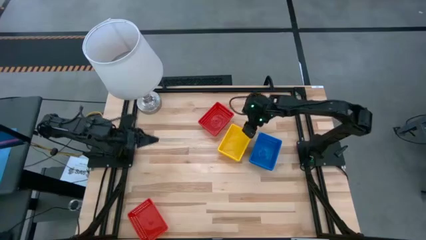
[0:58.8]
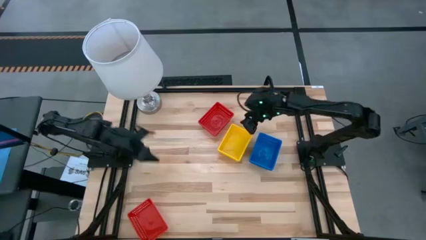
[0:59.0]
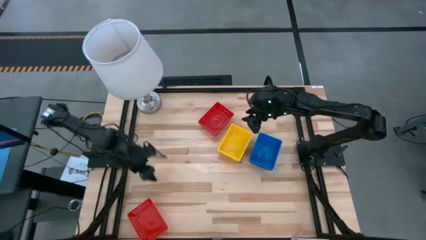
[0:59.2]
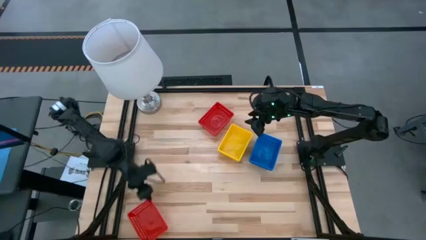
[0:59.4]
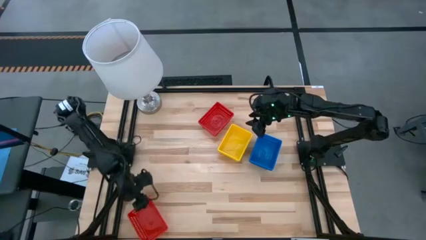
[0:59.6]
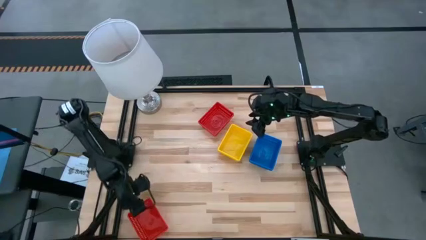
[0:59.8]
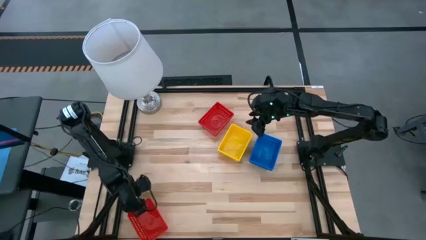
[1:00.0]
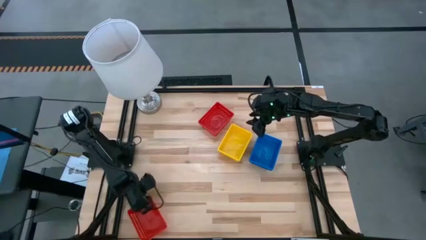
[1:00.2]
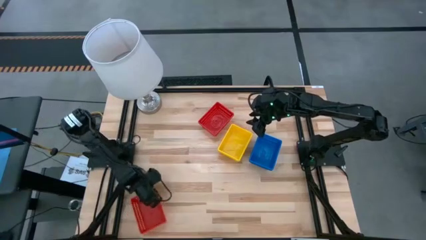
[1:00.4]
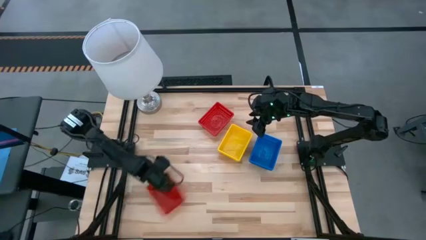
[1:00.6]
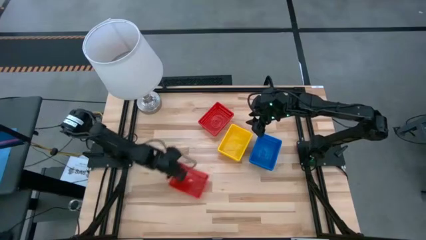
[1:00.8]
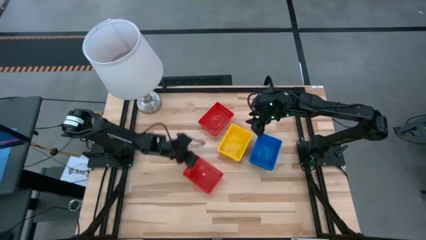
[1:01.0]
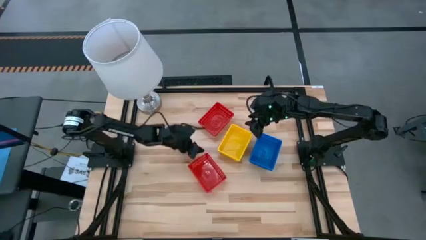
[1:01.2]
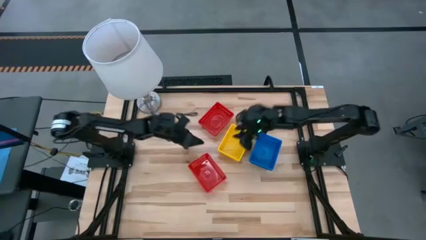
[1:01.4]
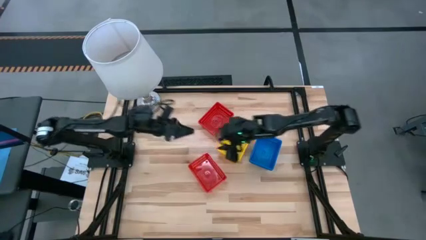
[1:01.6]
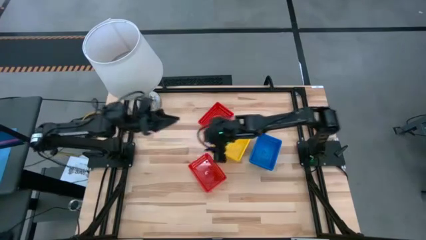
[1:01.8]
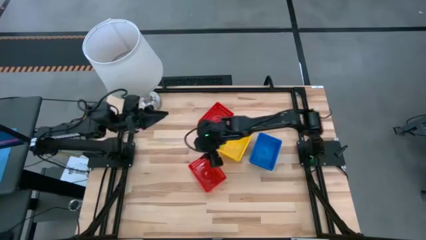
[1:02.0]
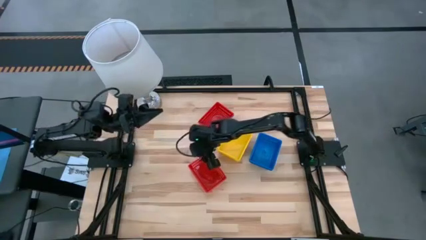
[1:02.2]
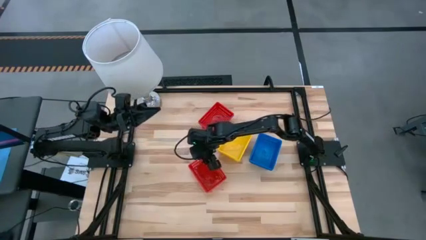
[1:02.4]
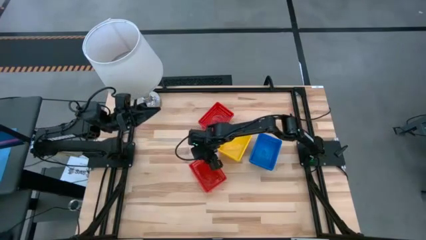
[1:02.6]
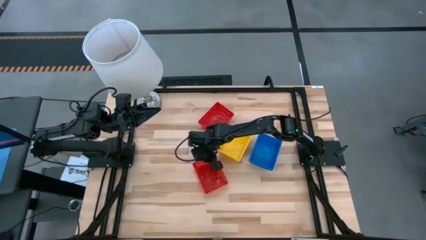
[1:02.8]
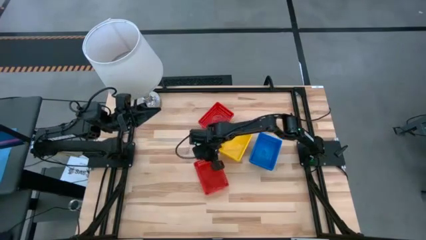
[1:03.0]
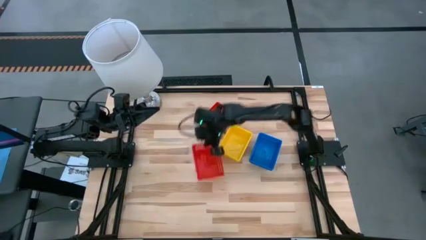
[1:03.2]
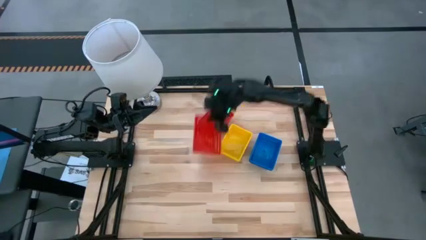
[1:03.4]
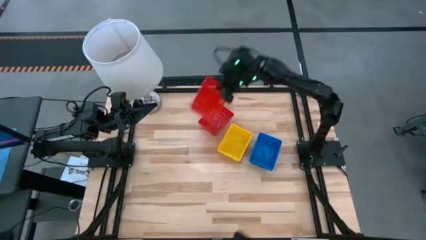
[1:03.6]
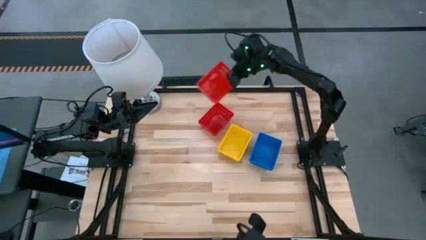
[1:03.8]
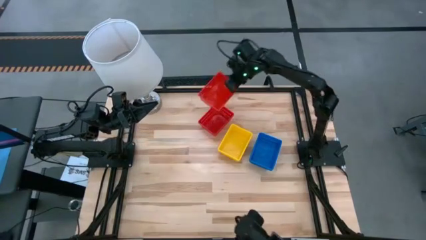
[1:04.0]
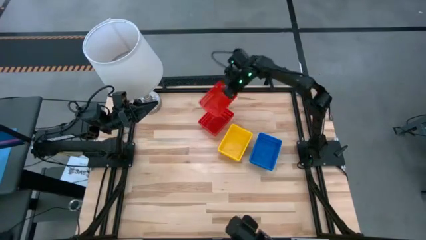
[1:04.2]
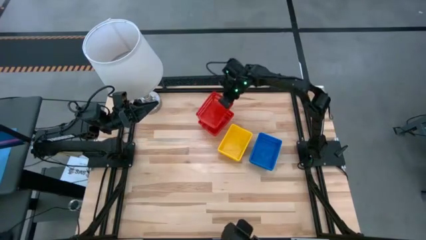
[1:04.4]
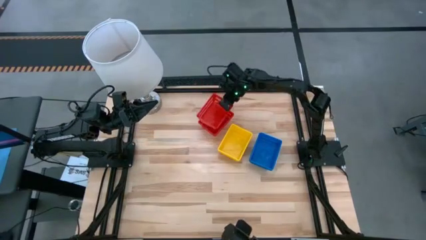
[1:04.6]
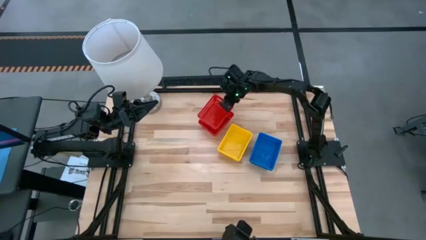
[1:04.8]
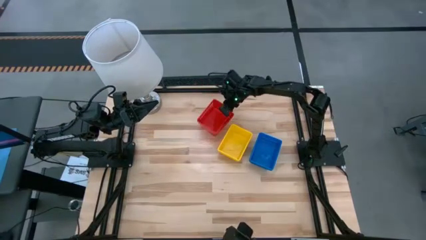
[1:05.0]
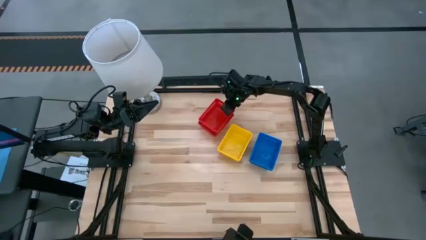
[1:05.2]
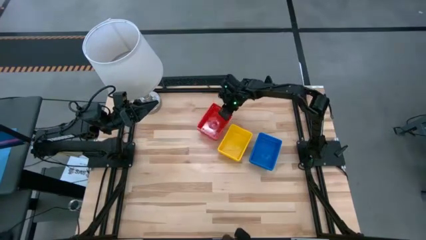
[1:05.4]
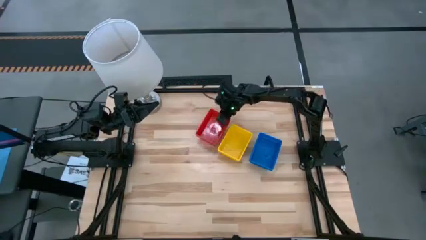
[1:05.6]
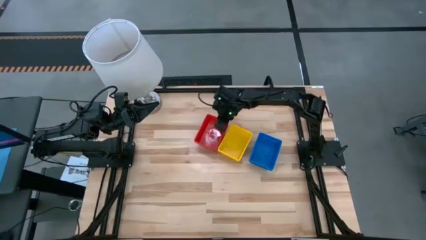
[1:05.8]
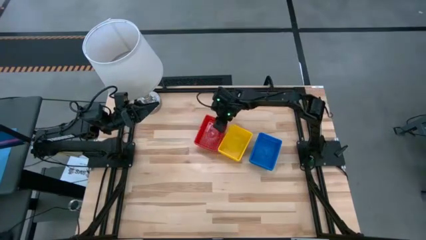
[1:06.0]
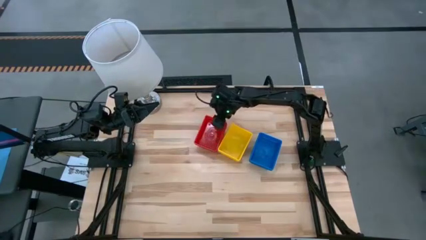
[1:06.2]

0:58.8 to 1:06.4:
Stack the red bin on the red bins

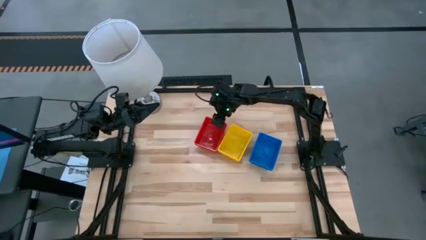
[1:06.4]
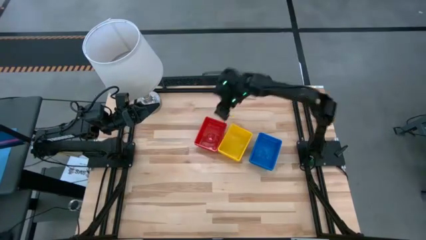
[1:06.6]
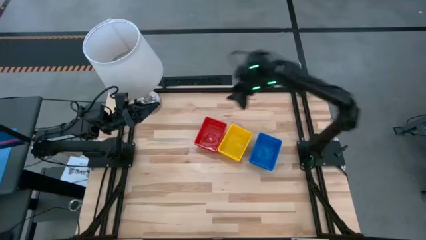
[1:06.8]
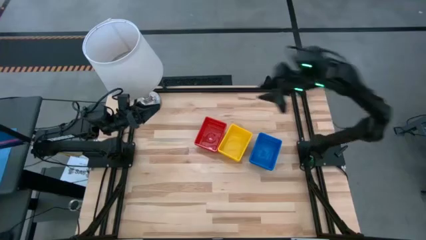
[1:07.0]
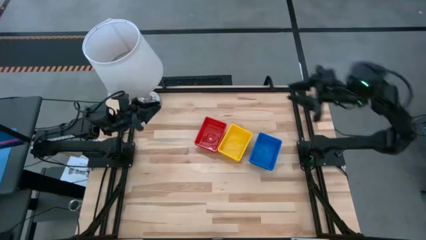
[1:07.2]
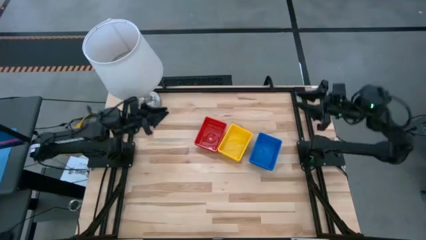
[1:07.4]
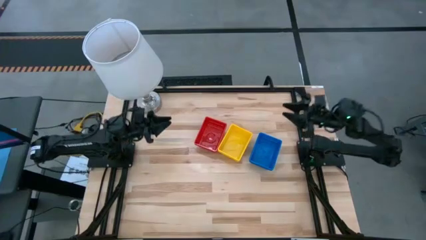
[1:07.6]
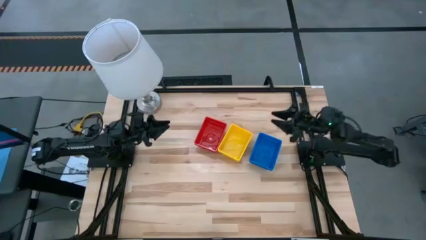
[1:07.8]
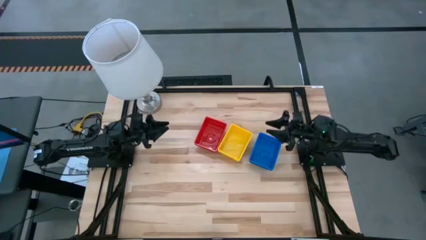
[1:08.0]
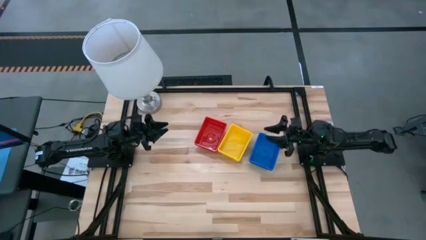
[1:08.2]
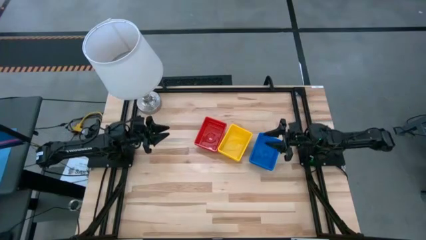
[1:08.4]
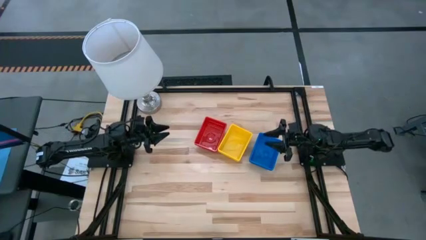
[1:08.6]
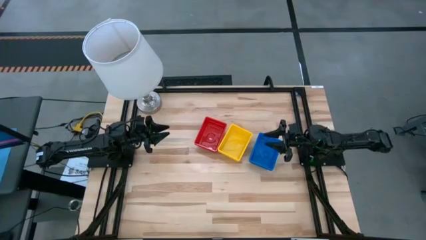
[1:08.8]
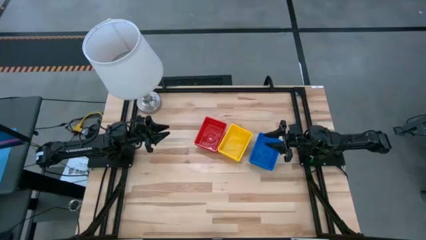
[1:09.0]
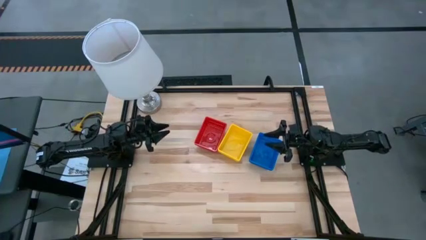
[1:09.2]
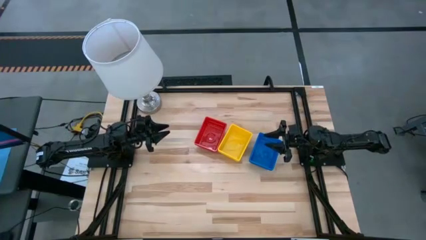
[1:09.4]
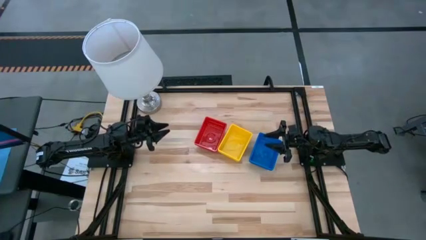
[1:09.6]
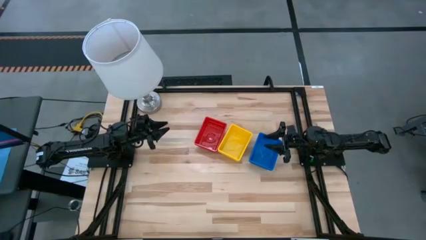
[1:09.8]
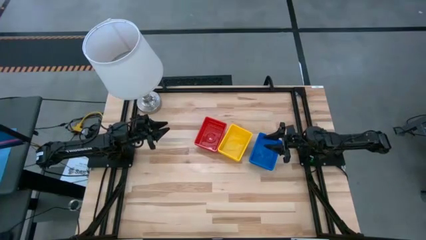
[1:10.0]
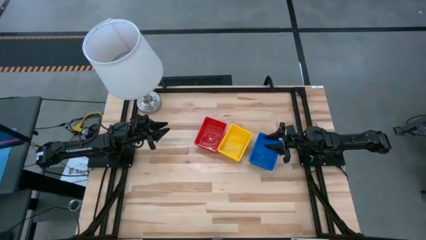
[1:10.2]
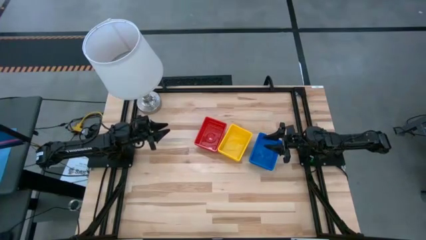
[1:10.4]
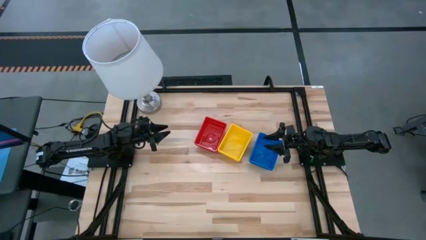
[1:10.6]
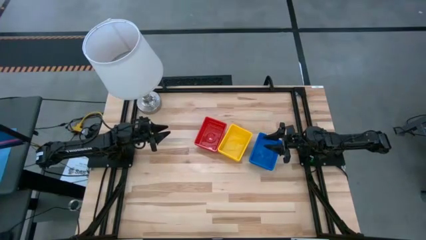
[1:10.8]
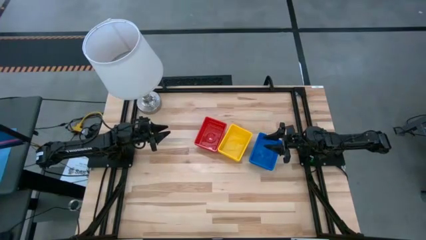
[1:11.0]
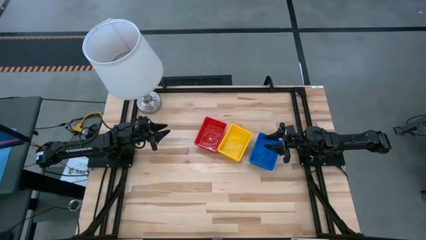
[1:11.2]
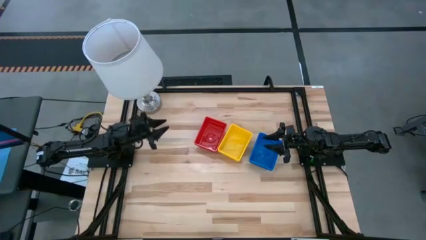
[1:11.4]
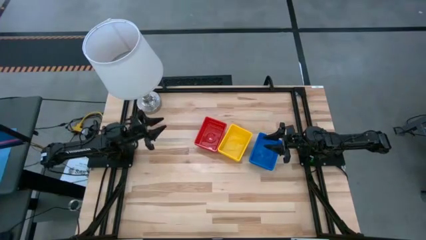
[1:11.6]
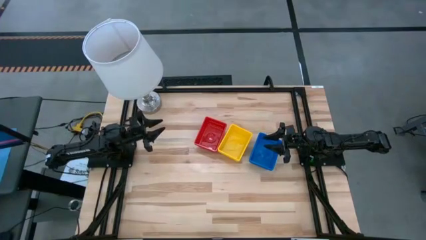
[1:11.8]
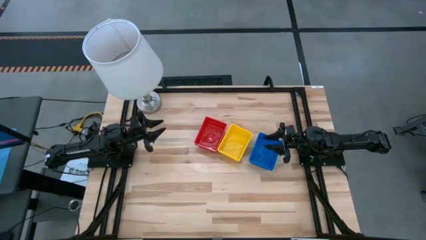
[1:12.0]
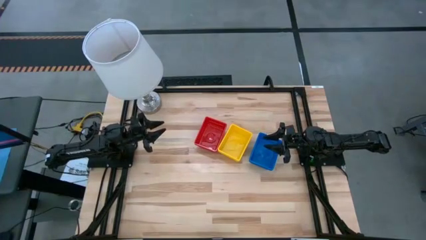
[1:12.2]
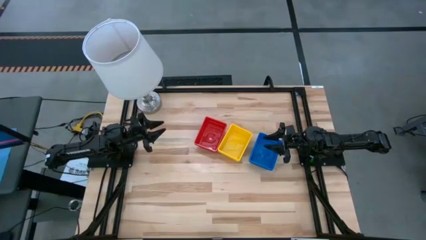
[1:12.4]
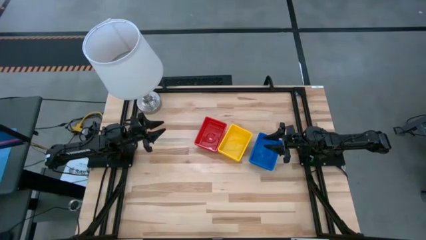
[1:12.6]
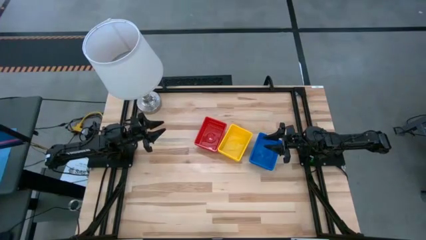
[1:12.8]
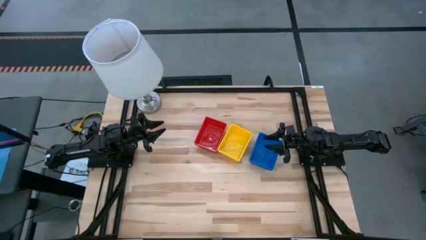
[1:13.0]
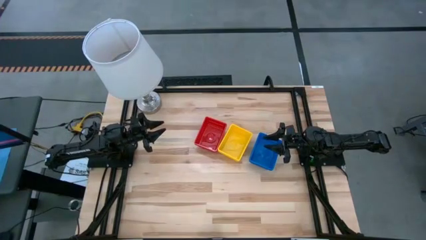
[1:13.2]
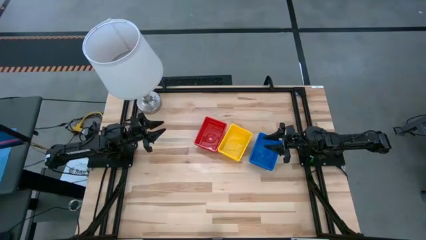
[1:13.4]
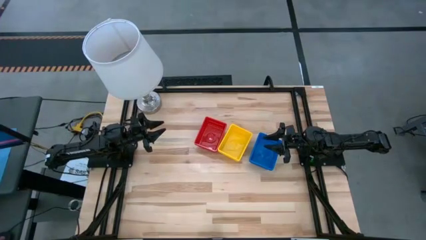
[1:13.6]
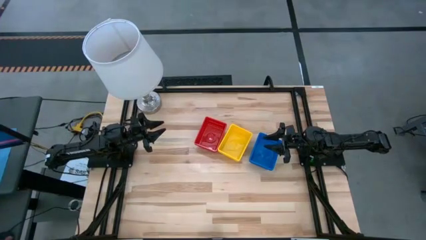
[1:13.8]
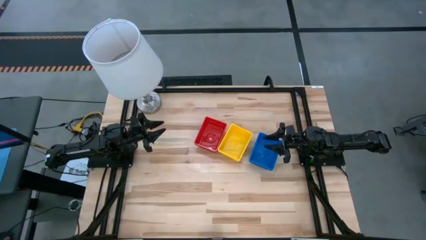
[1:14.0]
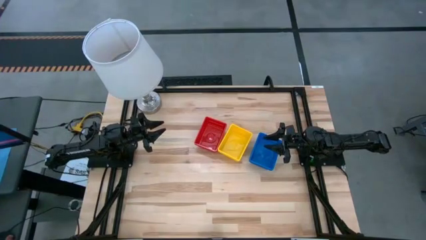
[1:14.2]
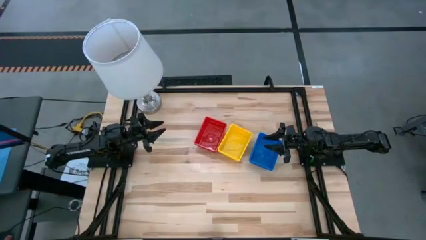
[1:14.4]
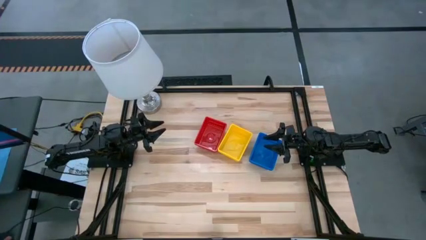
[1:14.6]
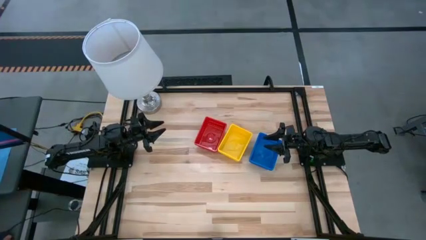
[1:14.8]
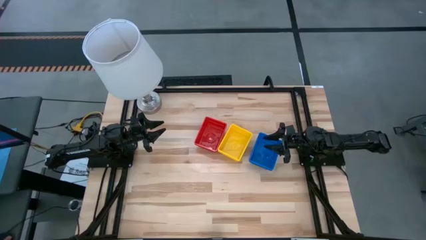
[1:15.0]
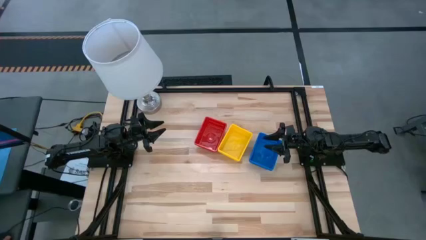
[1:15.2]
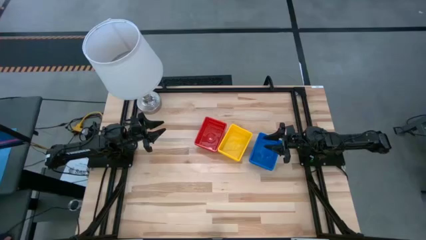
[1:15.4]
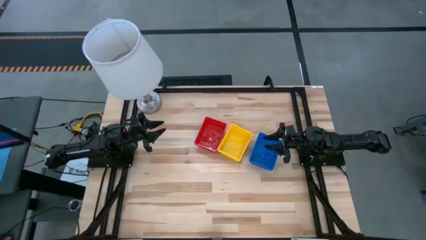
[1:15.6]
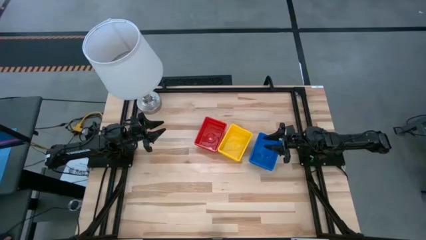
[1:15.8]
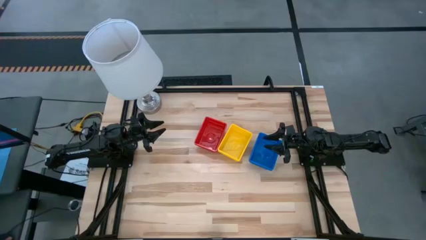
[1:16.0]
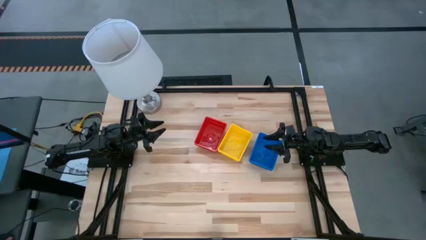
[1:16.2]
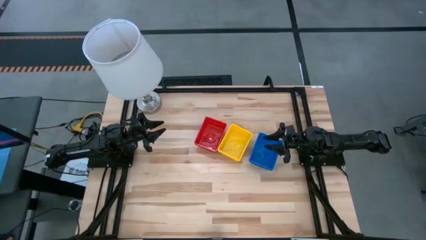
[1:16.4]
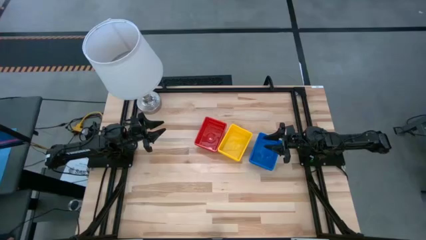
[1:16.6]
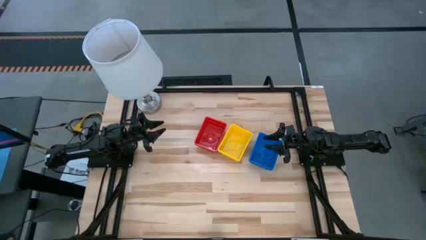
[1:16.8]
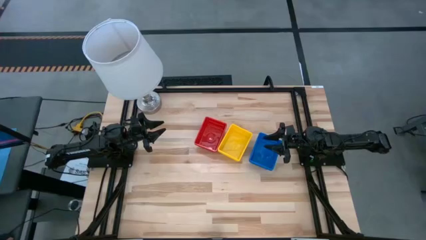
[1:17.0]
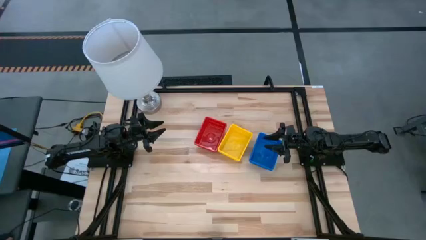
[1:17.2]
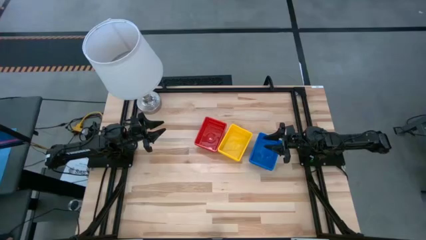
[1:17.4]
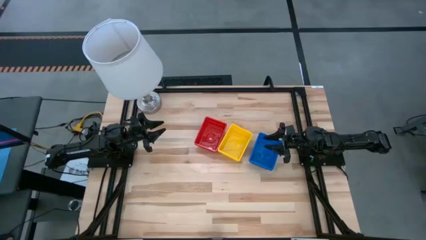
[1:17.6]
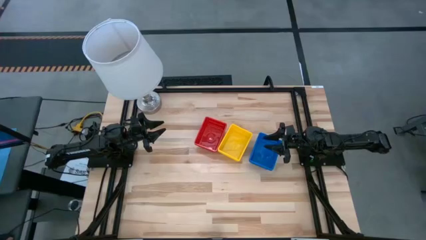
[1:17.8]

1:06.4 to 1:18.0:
Return to Home Position
